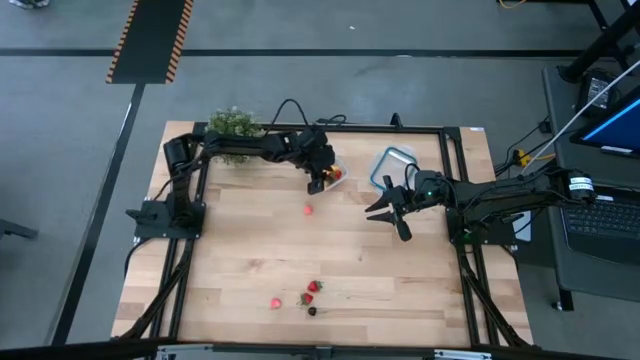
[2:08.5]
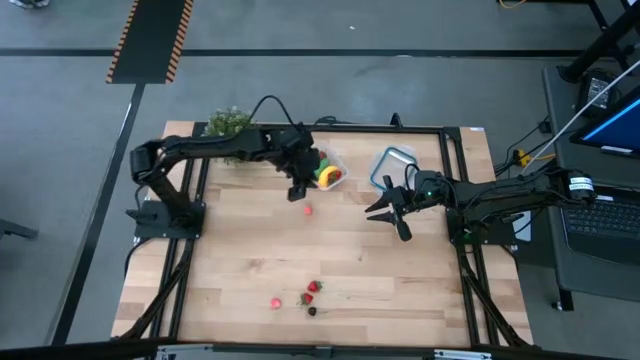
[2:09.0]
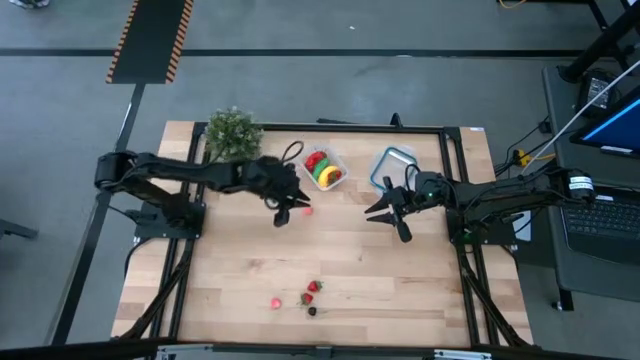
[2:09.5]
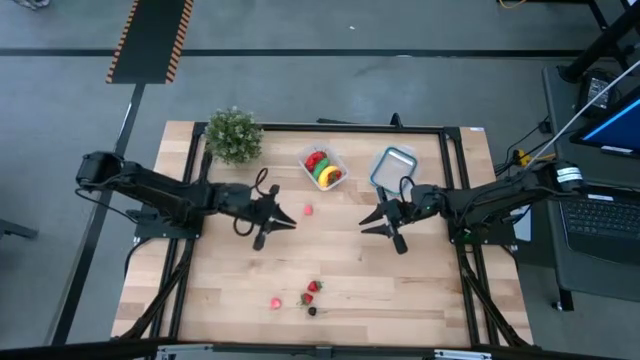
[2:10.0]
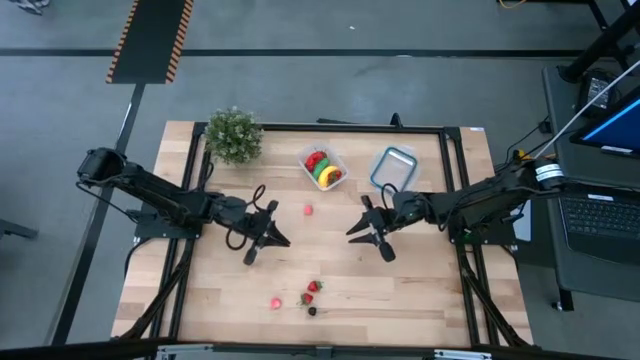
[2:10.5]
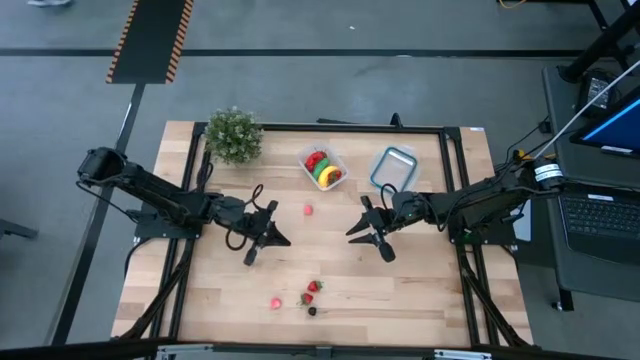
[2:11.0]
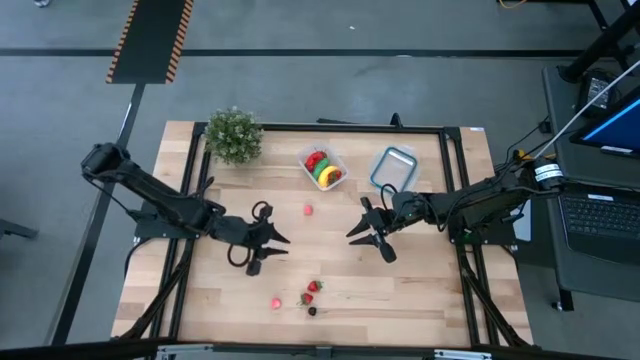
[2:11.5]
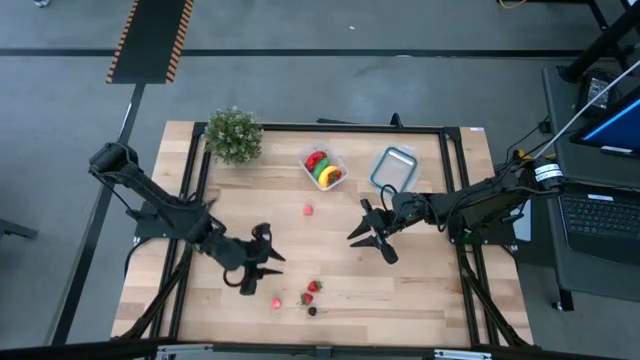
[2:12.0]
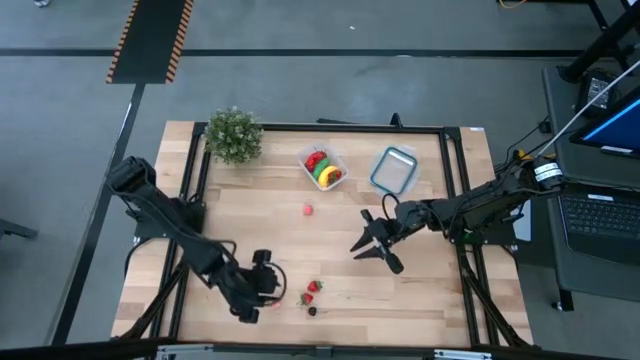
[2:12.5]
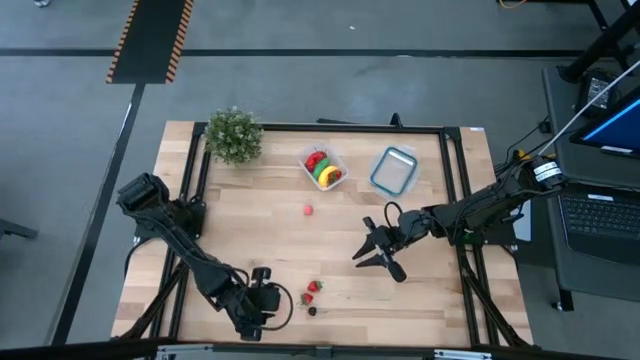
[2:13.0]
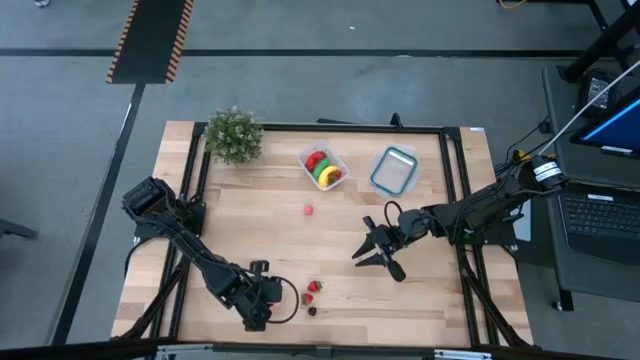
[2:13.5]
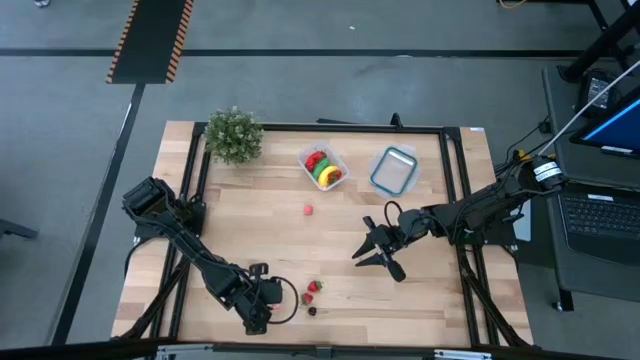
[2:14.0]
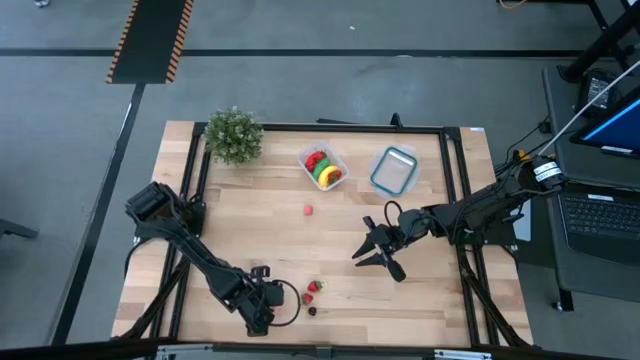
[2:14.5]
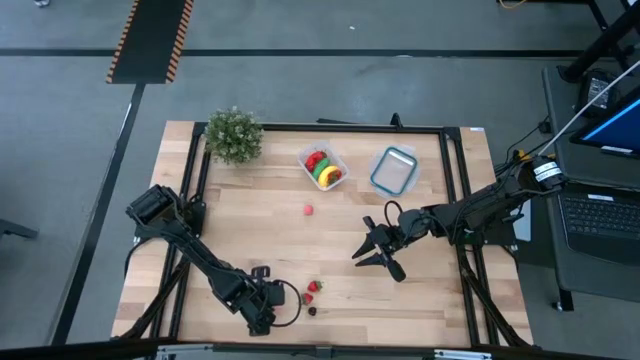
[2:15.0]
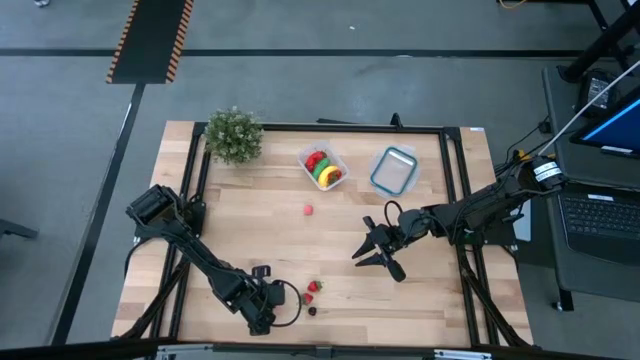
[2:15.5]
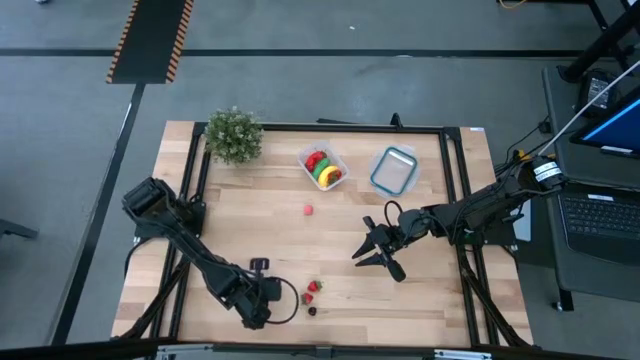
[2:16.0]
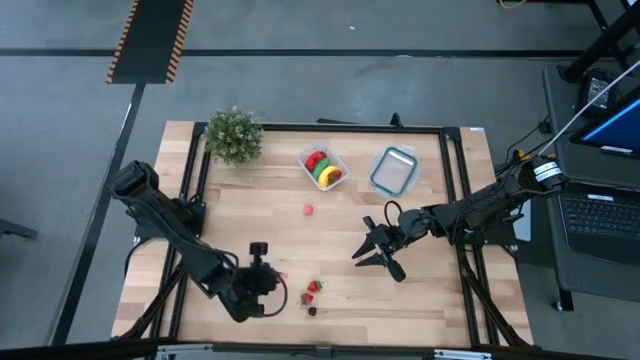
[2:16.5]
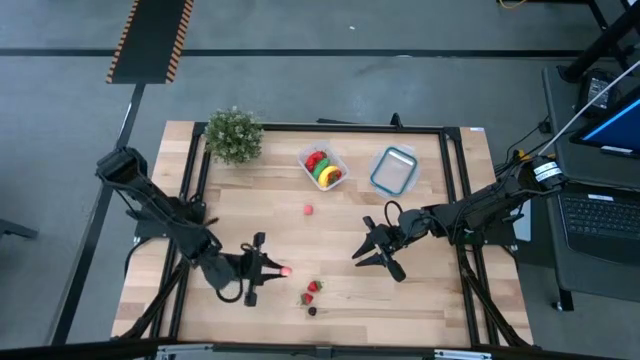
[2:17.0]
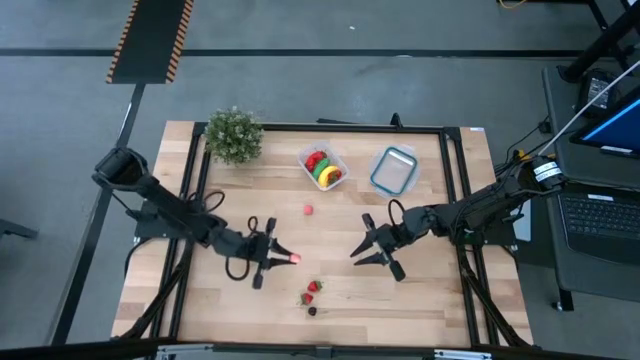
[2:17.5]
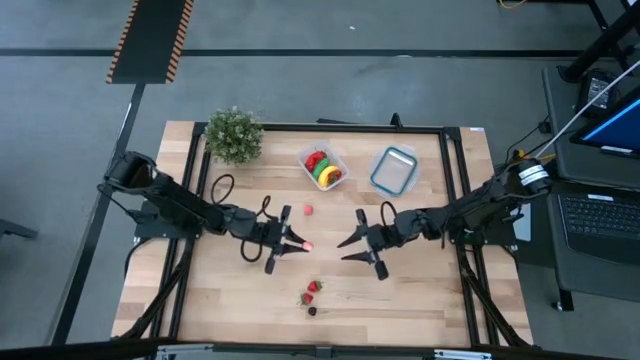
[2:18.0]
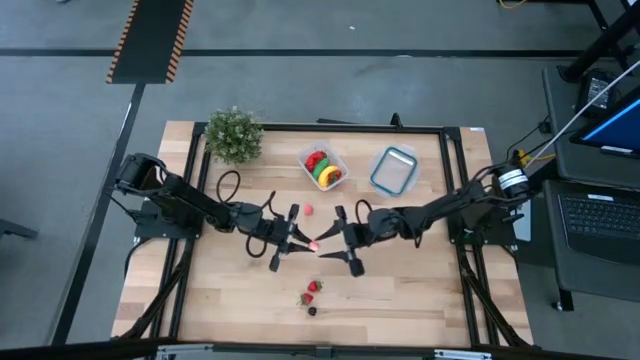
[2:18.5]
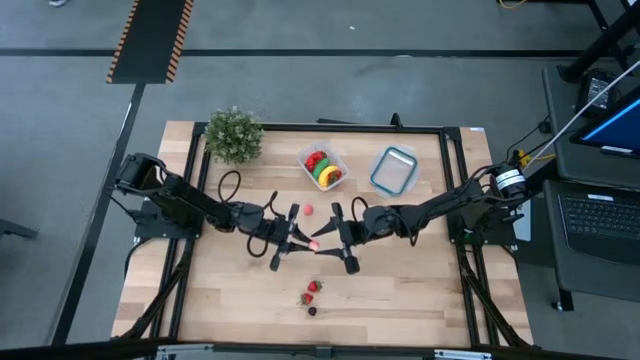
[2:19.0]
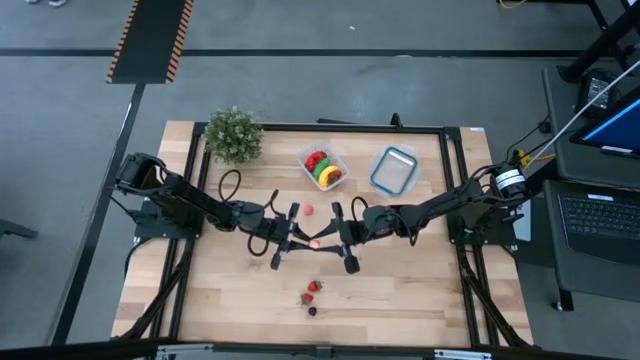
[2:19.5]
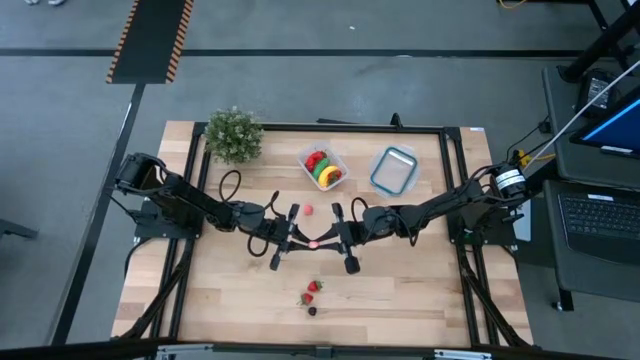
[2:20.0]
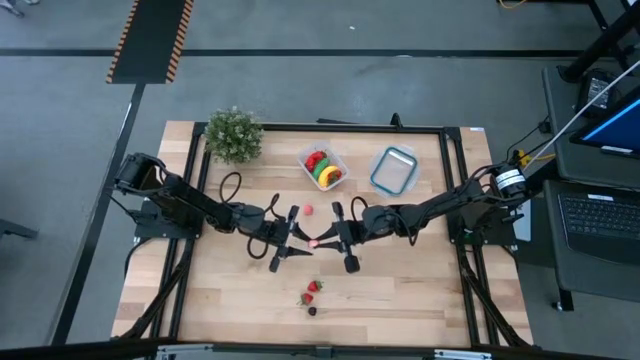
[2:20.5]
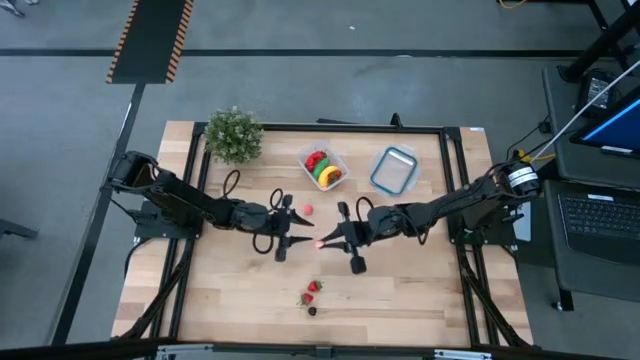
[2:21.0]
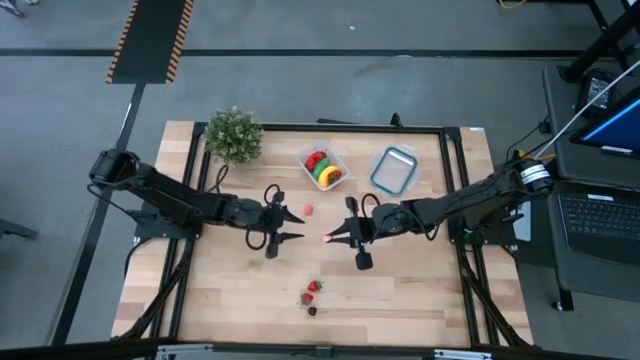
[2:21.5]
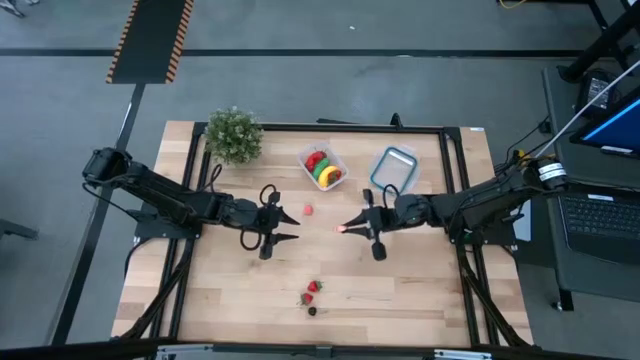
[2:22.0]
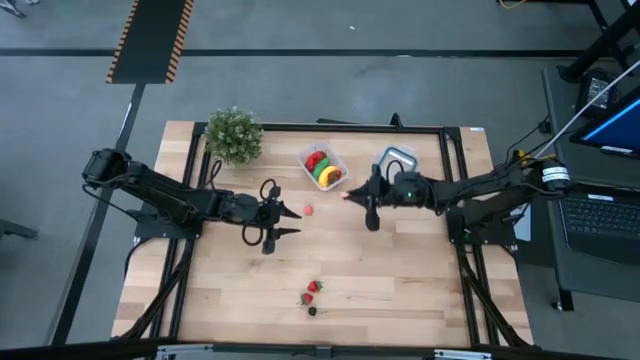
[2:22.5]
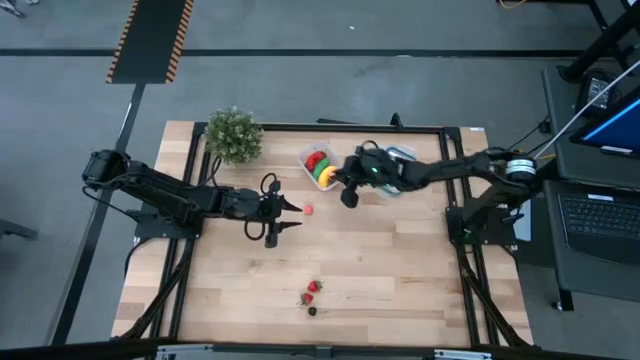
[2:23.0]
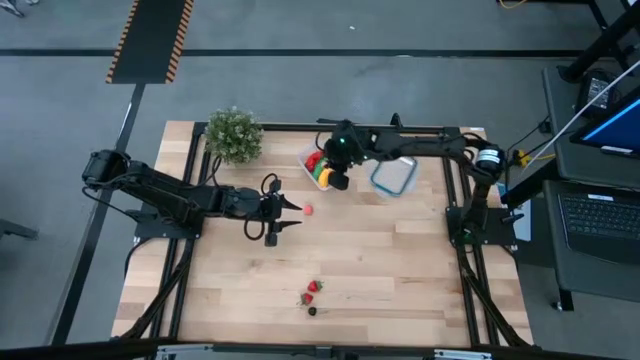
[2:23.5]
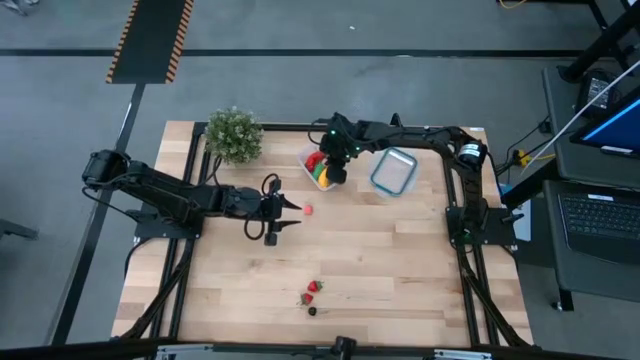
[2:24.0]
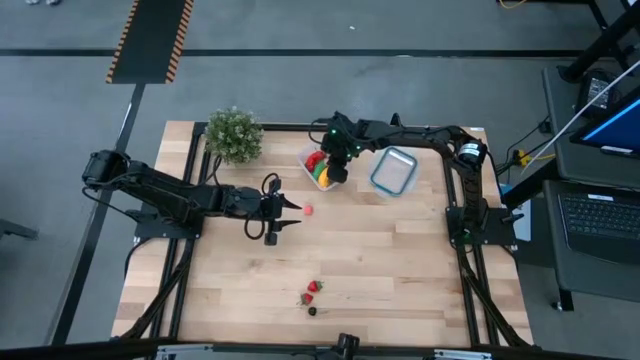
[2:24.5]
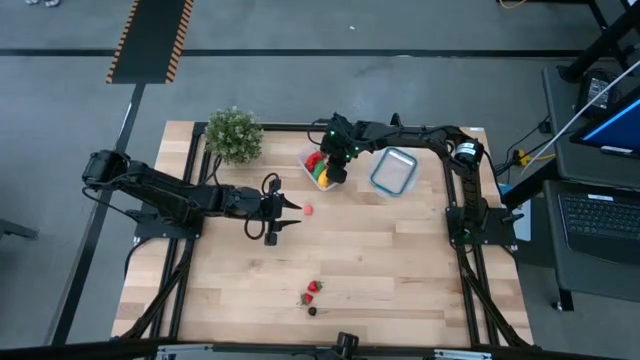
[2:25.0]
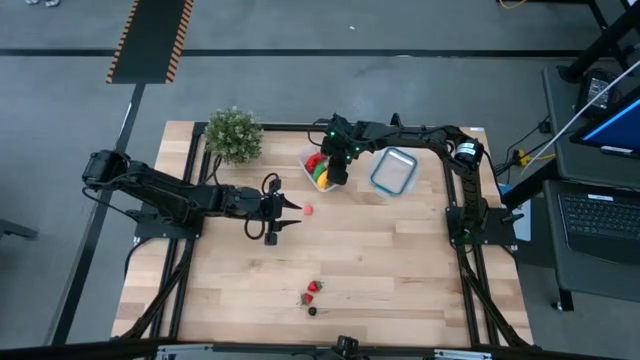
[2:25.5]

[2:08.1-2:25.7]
Task: Pick and placing Produce into tupperware
Put the bottom pink apricot into the transparent container

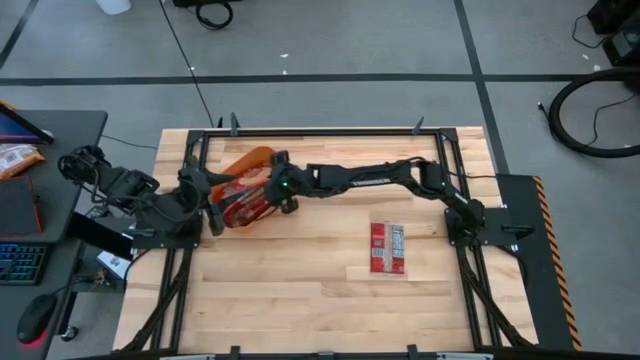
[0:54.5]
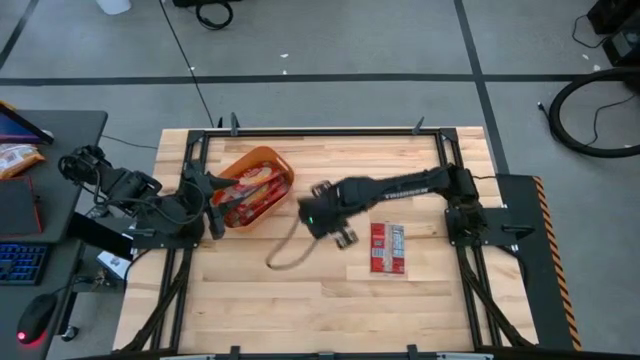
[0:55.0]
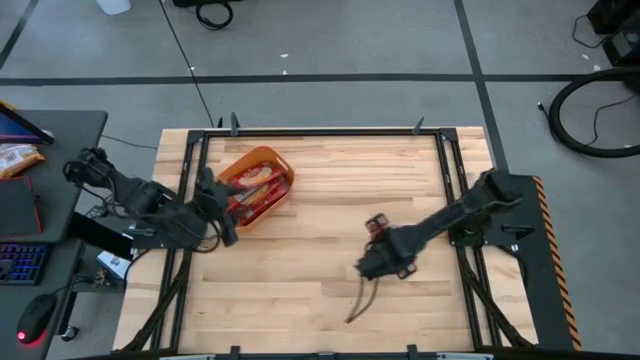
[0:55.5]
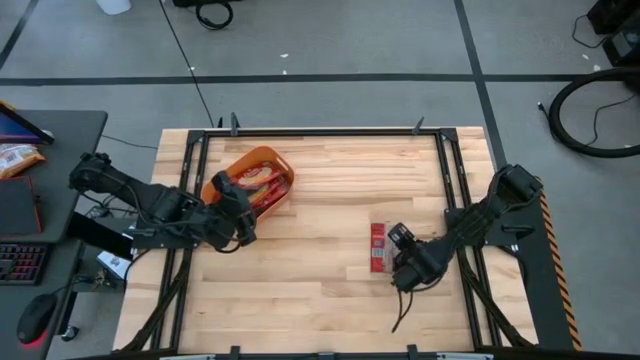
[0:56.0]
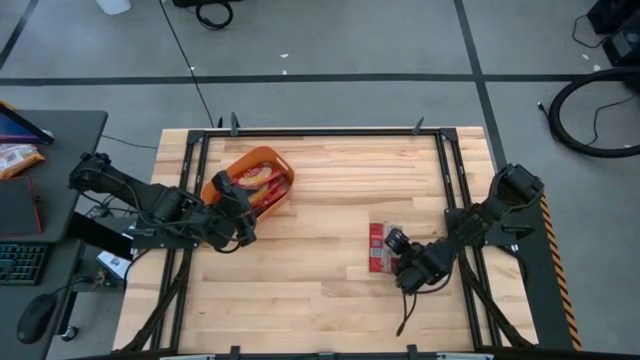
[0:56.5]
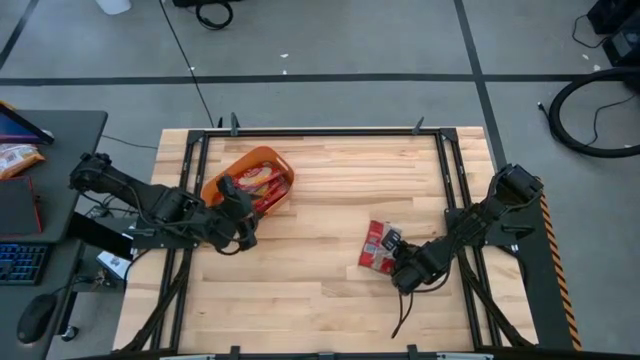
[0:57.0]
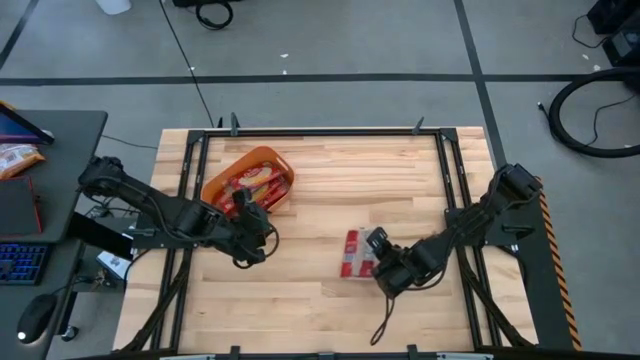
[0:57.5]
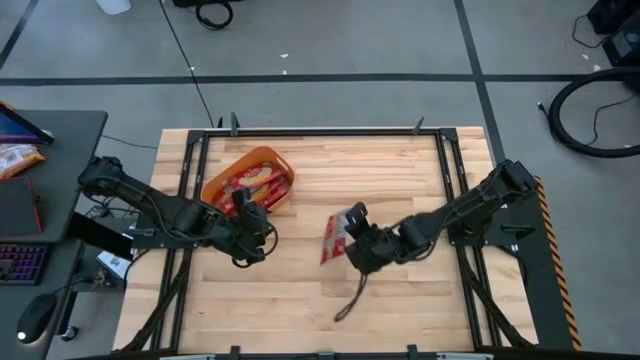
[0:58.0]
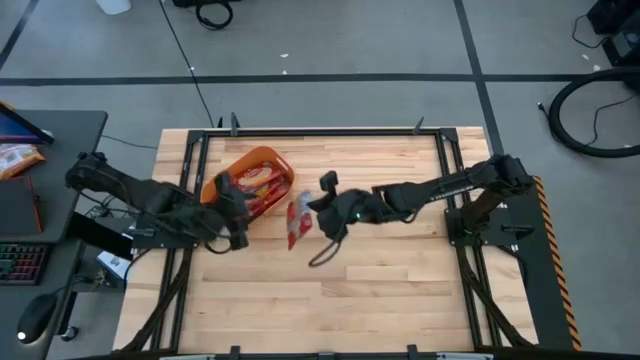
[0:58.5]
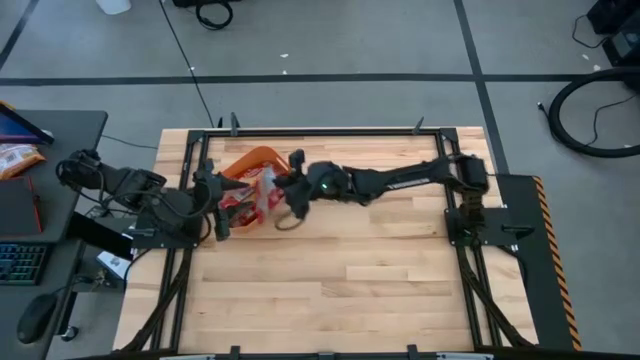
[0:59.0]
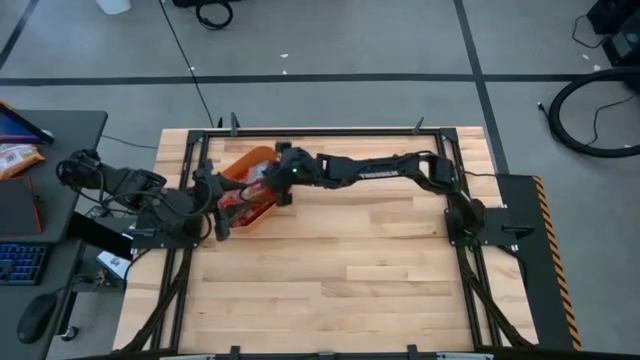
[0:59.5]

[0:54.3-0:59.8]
Task: Sort popcorn bags into baskets
Put the red popcorn bag into the orange bin
